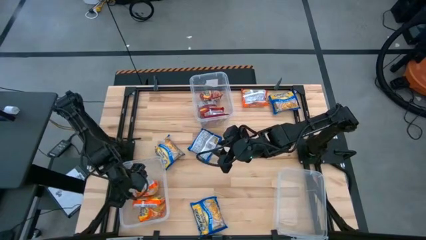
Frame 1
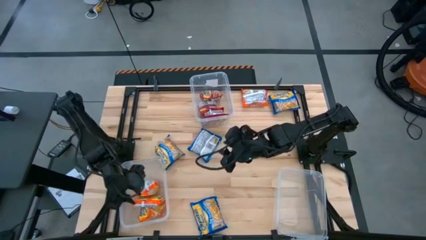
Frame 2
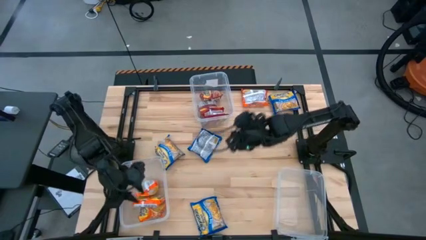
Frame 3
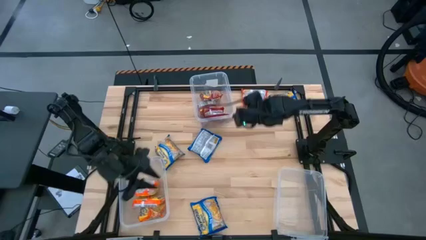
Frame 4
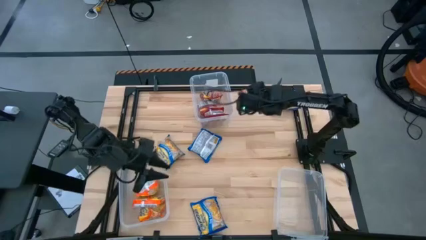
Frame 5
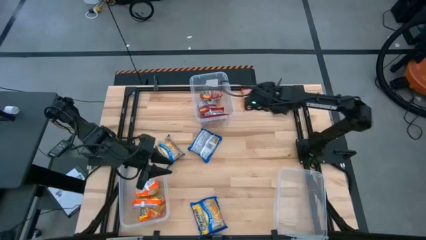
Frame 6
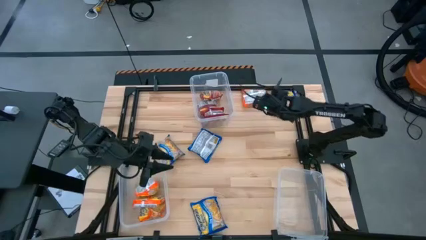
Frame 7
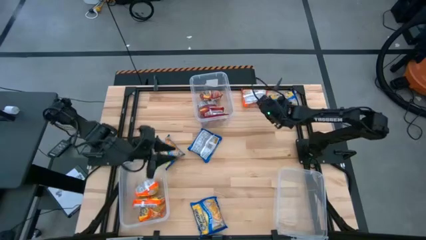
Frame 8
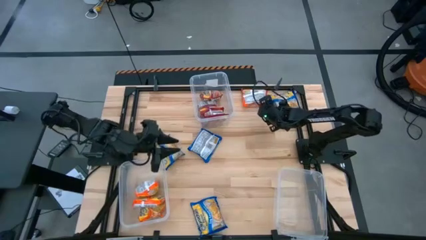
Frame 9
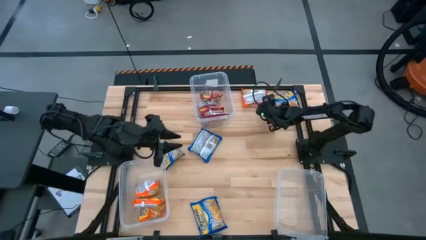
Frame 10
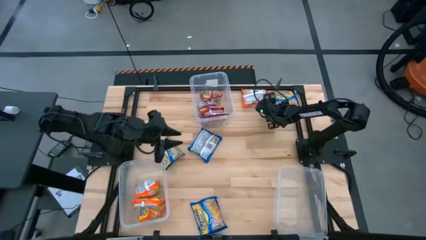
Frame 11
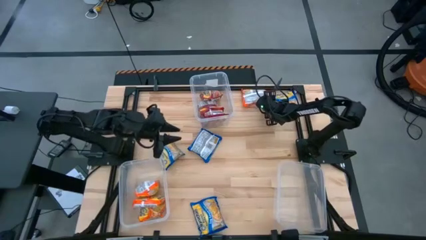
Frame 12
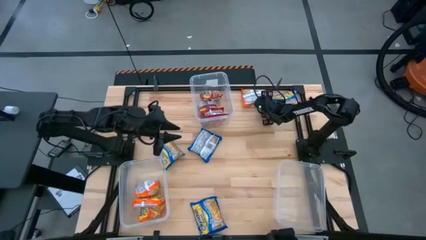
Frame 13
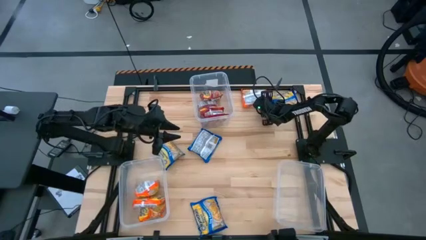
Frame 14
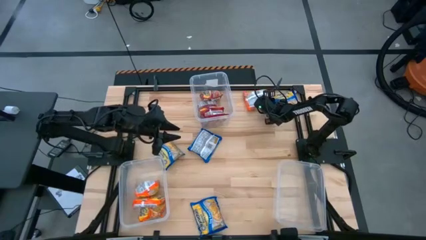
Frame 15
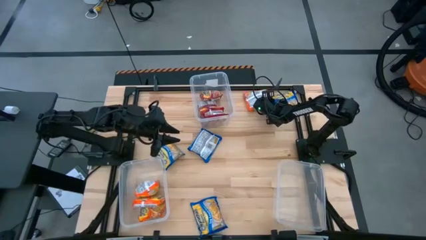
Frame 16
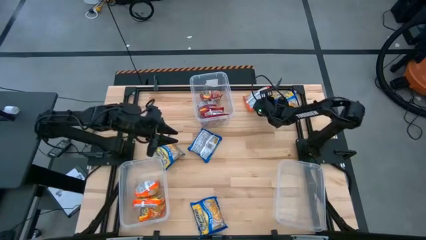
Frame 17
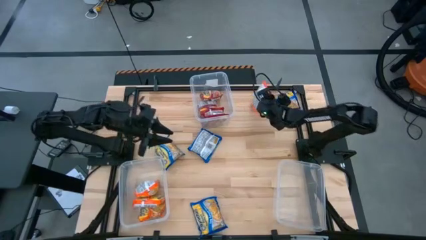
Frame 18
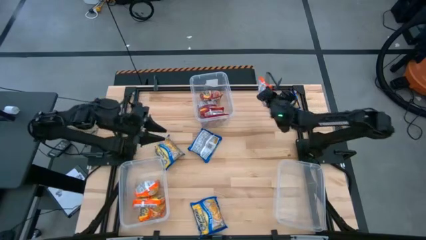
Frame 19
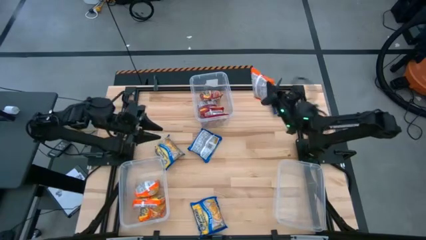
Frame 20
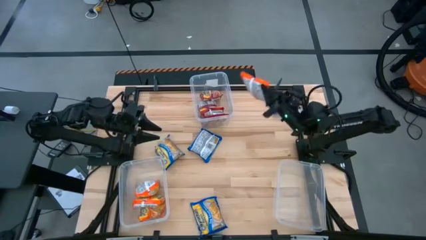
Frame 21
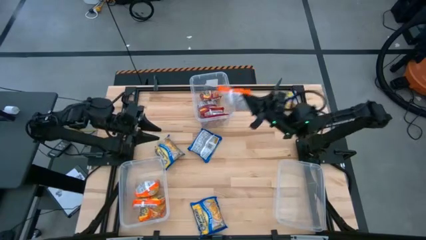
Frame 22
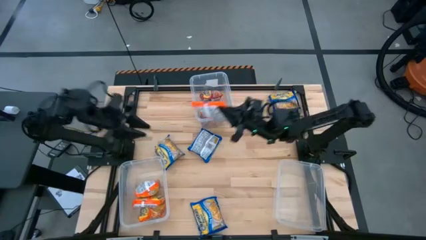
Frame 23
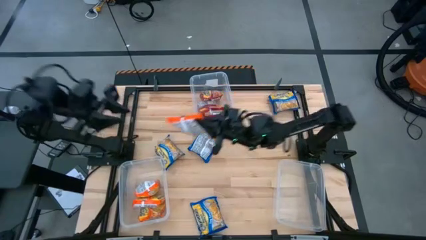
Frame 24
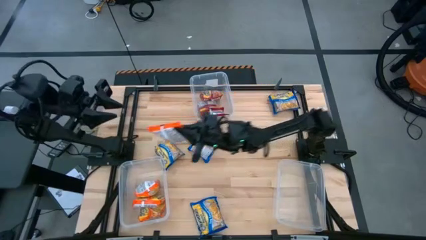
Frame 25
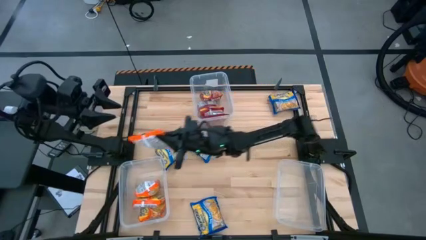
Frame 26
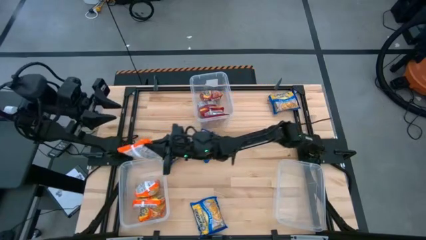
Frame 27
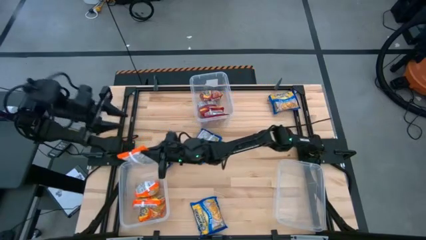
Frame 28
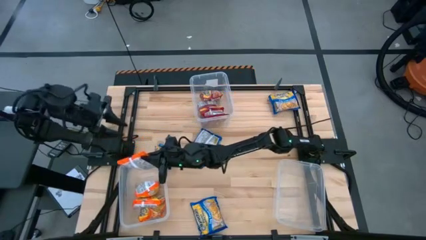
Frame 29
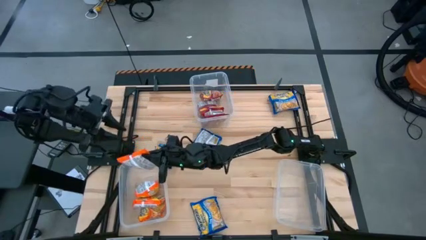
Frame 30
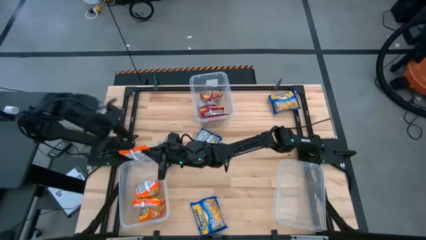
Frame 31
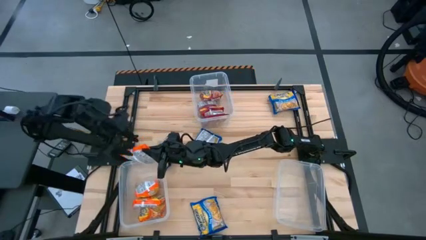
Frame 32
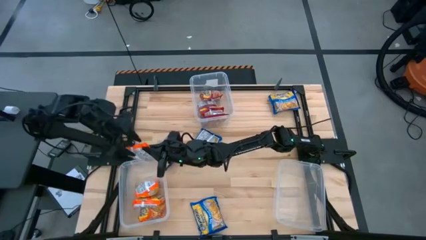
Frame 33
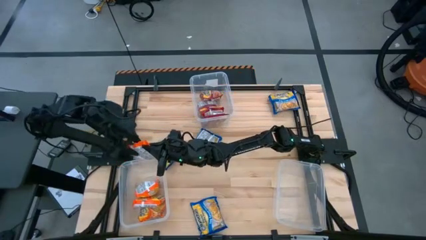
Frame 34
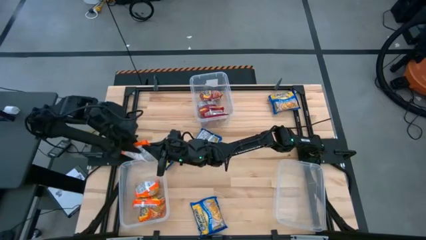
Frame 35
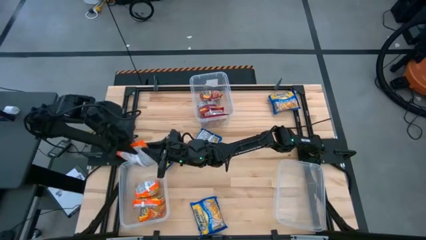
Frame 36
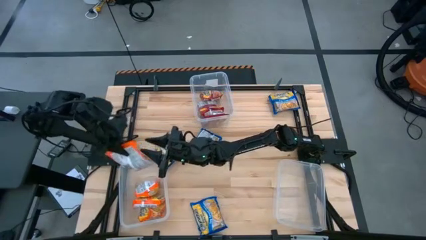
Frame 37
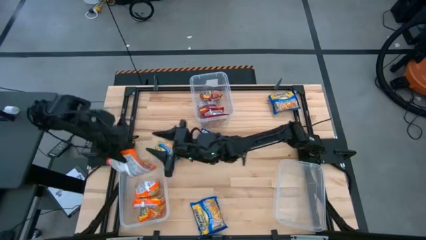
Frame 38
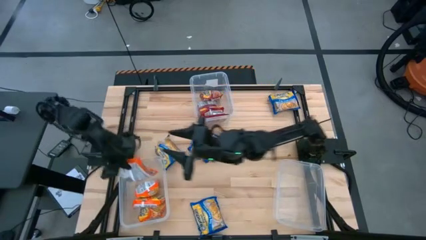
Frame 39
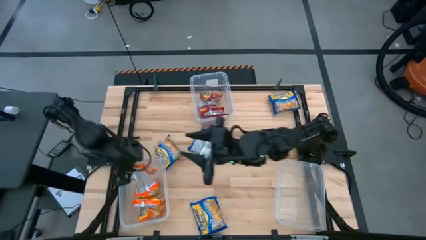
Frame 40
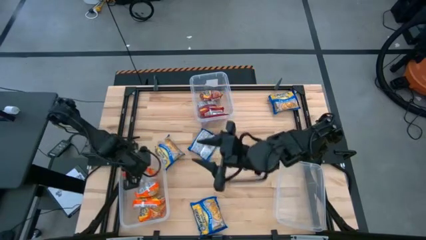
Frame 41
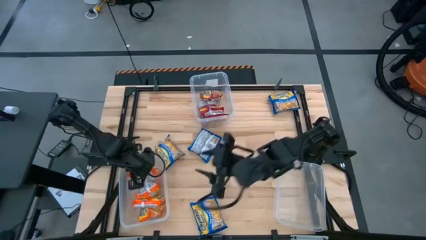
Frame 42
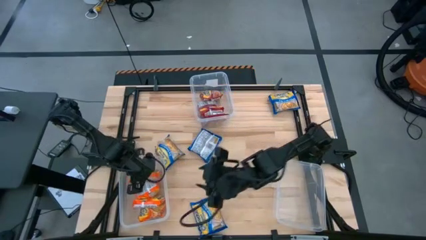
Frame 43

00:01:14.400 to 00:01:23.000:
Task: Sort Maruchan noodles
Put the orange noodle pack into the bottom left transparent bin

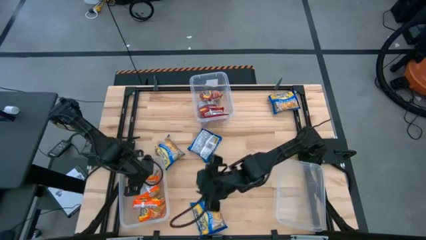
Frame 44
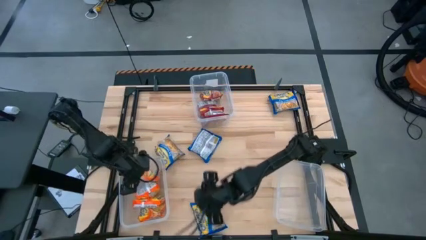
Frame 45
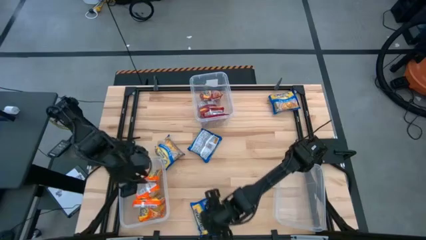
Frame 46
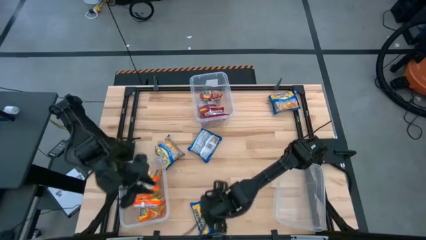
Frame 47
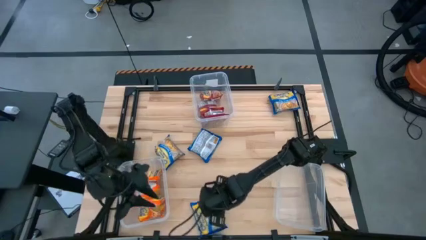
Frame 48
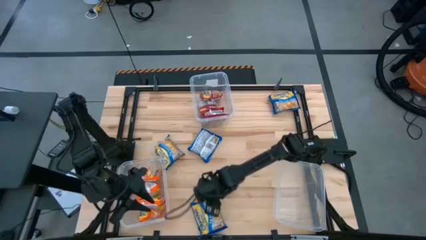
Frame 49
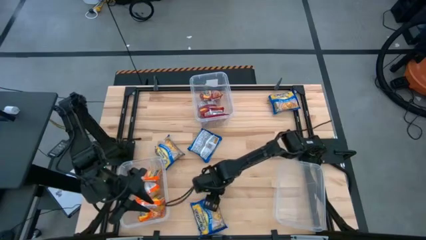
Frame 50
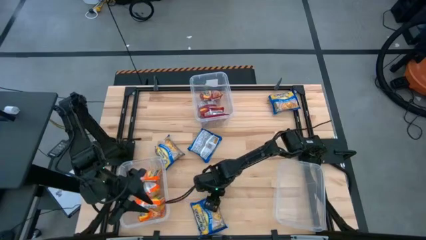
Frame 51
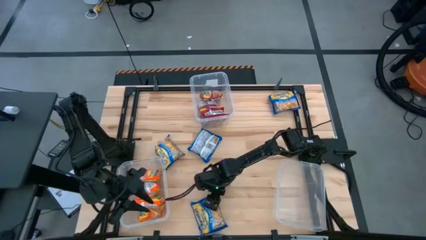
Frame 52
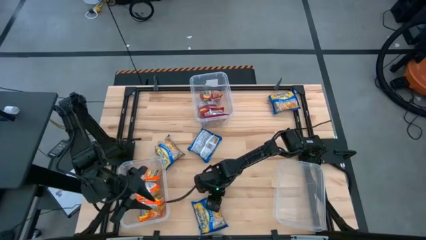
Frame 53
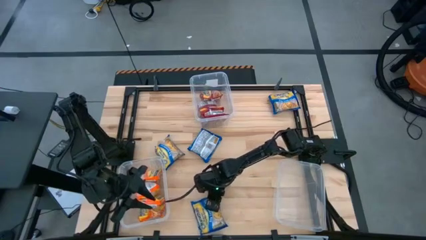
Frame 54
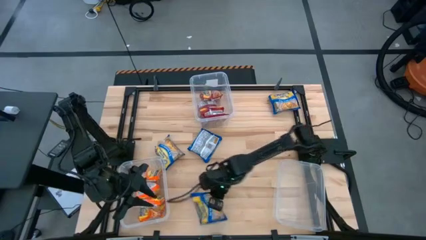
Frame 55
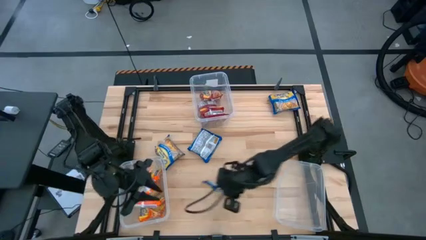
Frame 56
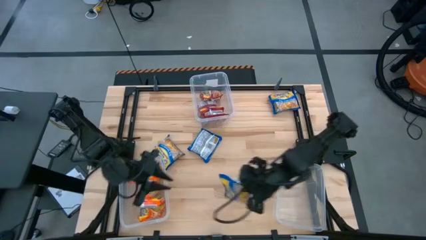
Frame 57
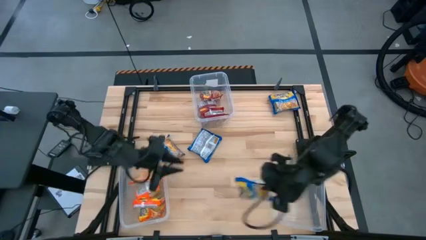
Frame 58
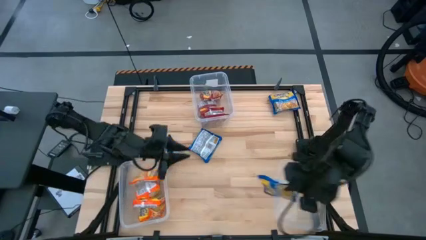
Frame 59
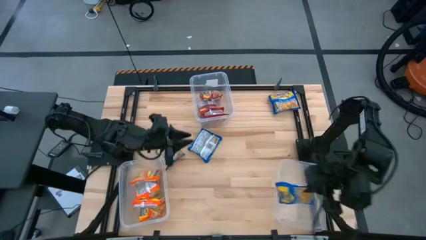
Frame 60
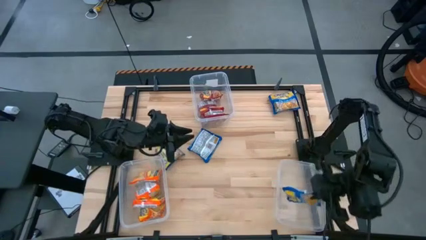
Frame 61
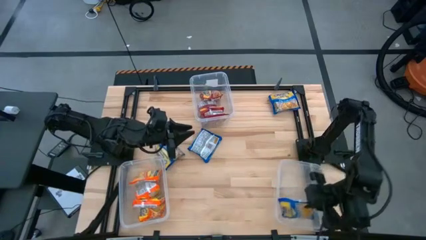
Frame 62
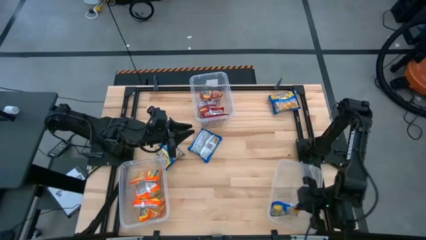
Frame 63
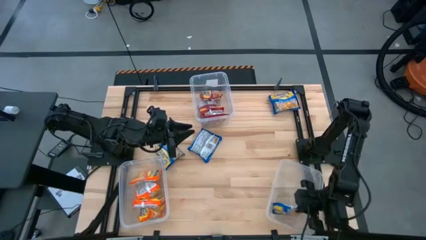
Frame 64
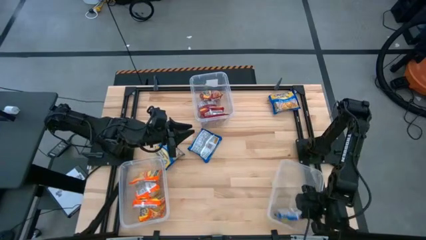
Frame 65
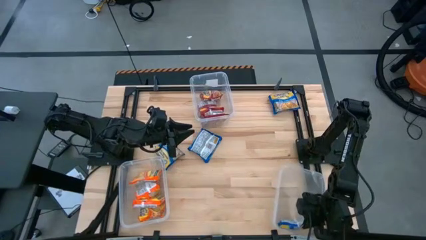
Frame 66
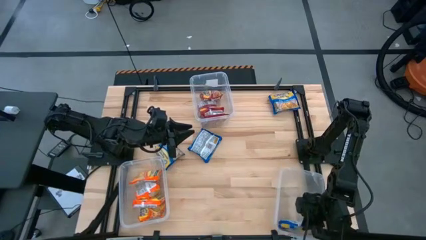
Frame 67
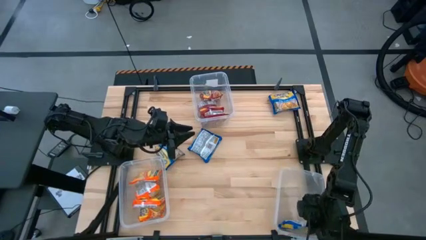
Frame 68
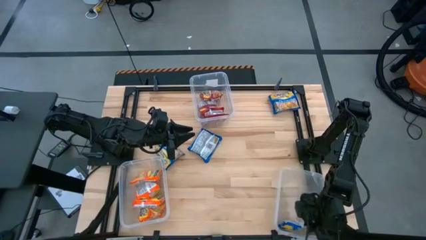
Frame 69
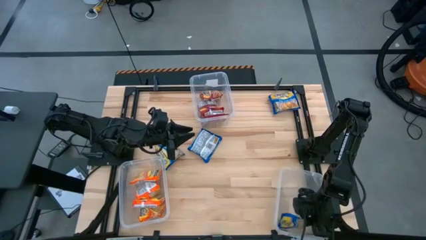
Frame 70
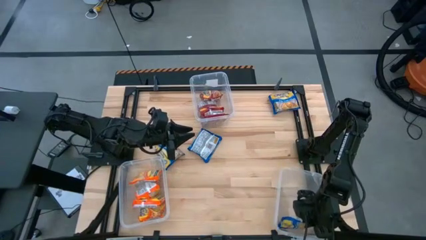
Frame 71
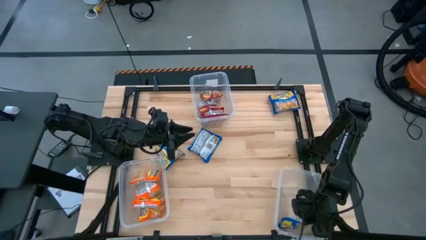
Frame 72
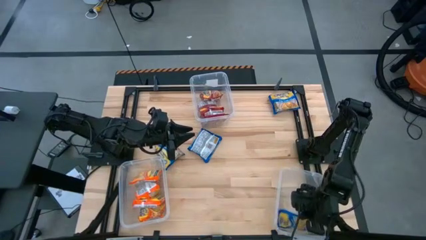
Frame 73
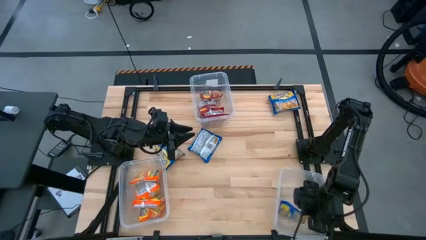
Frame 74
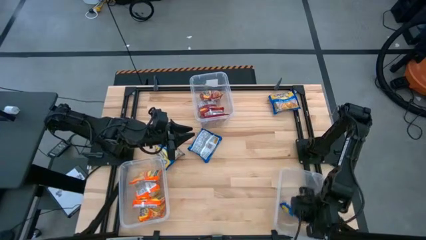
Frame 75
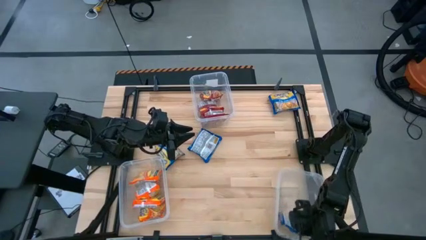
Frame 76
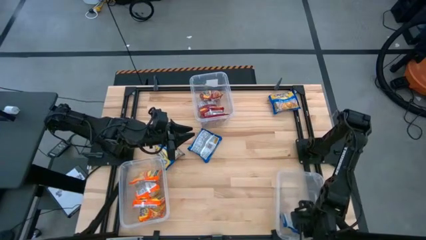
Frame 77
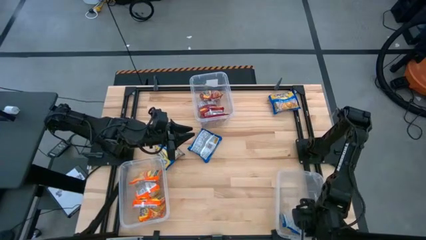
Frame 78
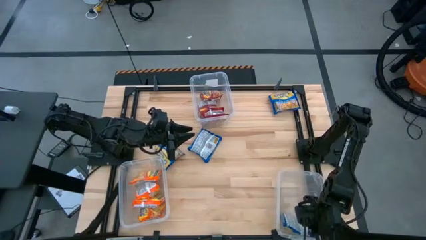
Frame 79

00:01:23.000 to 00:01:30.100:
Put the blue noodle pack into the bottom right transparent bin
